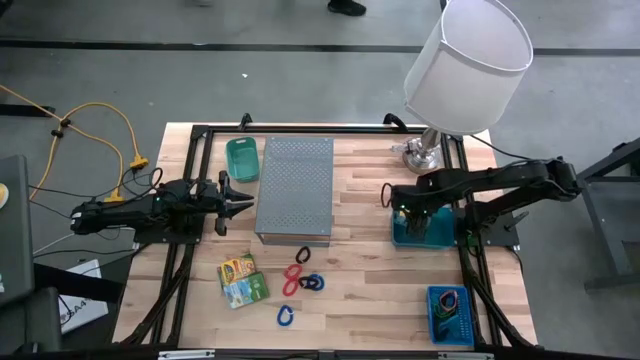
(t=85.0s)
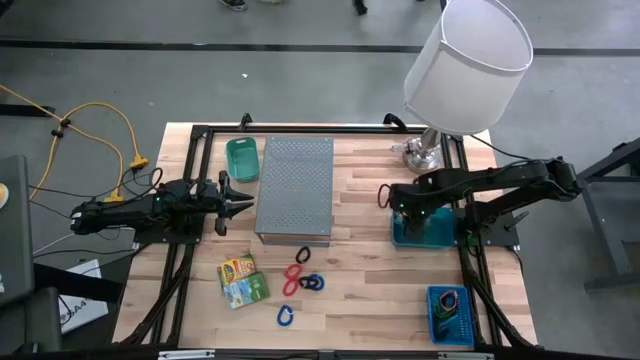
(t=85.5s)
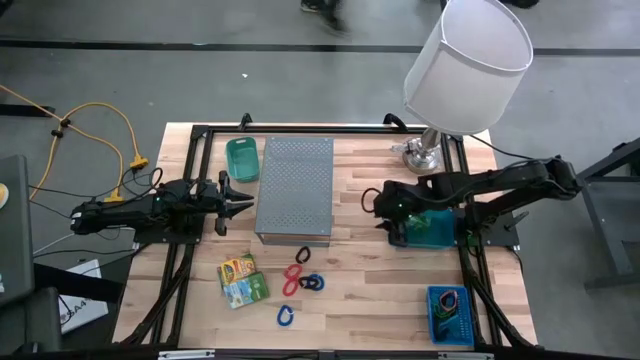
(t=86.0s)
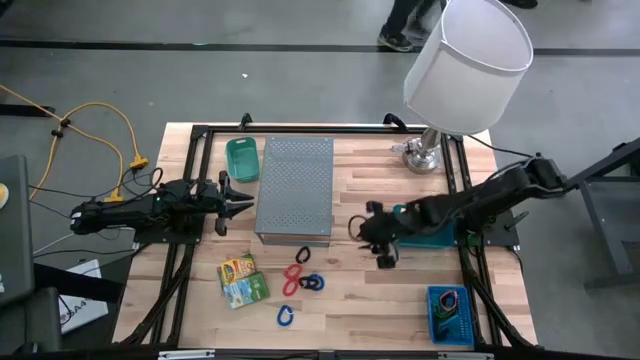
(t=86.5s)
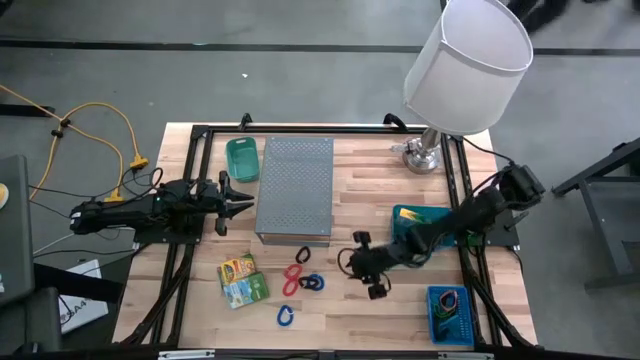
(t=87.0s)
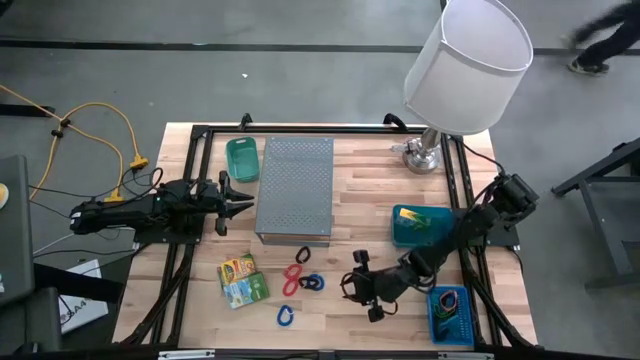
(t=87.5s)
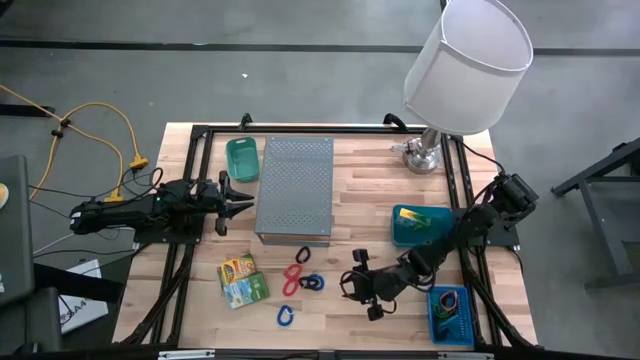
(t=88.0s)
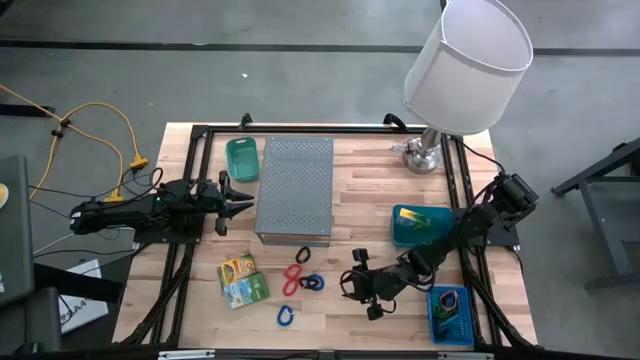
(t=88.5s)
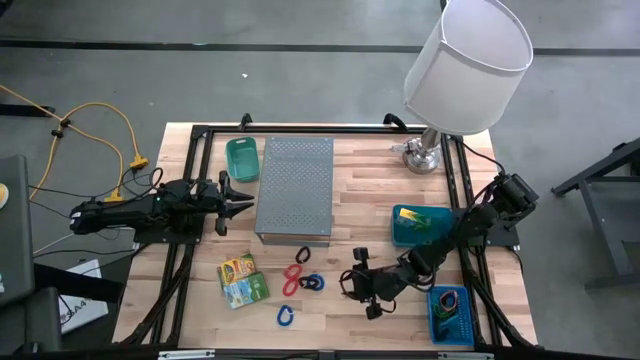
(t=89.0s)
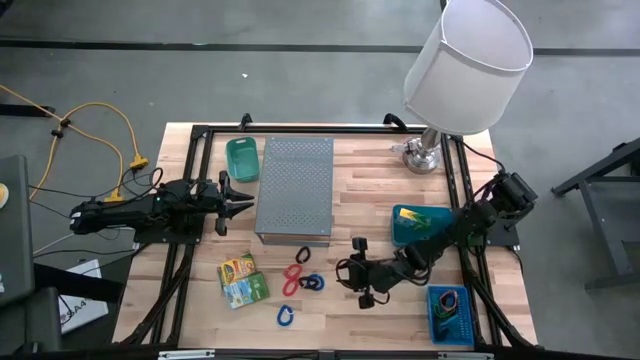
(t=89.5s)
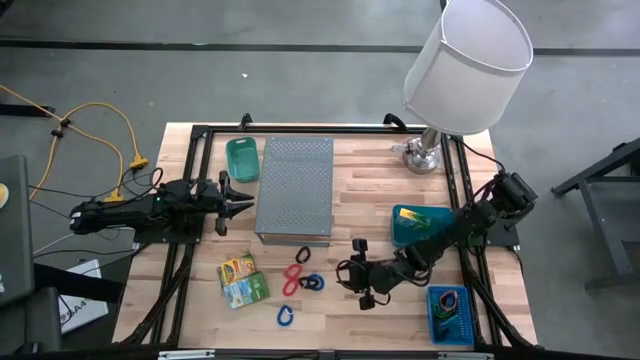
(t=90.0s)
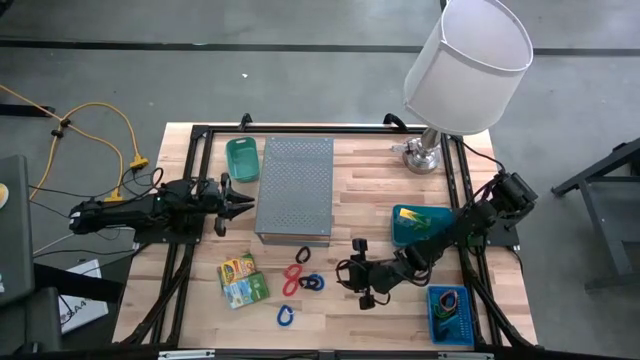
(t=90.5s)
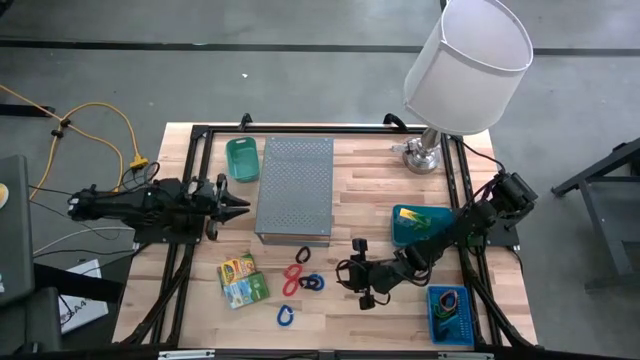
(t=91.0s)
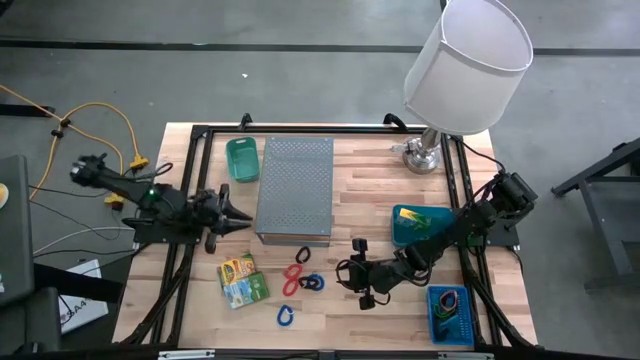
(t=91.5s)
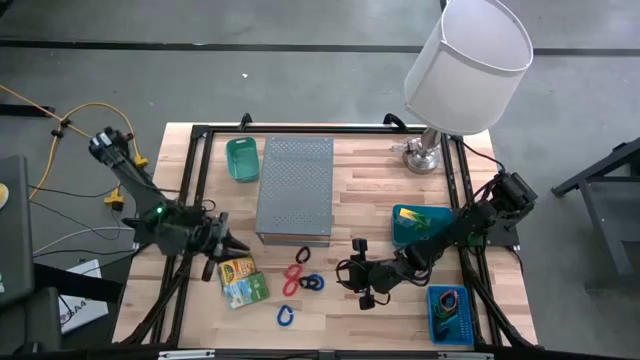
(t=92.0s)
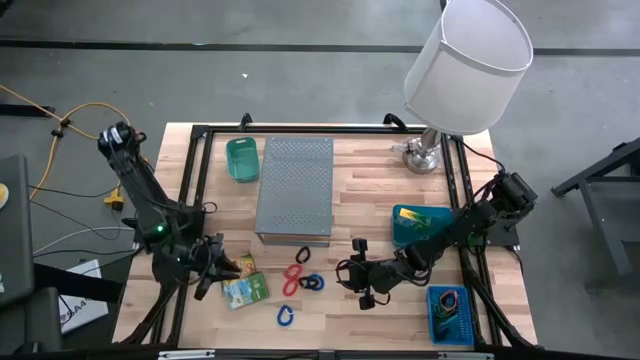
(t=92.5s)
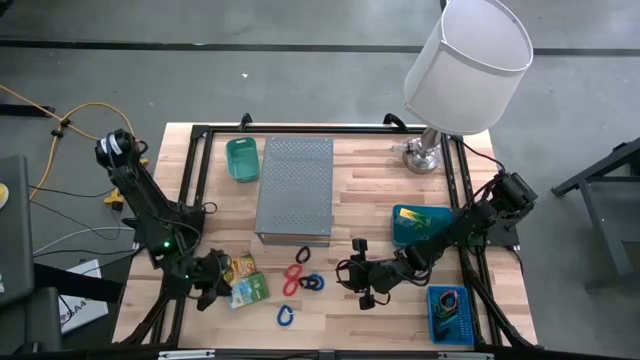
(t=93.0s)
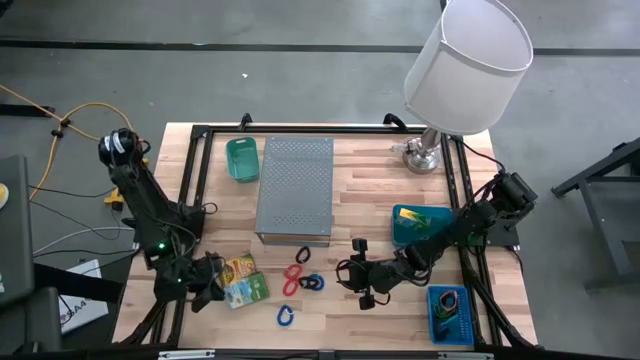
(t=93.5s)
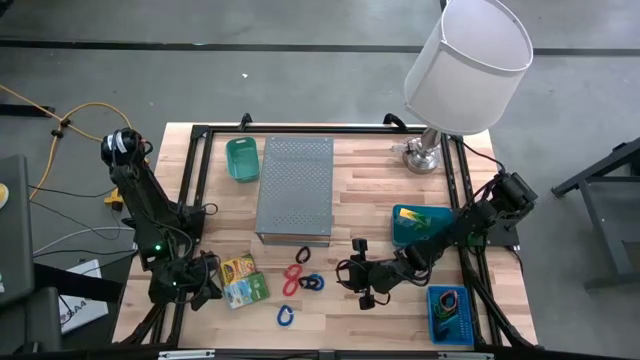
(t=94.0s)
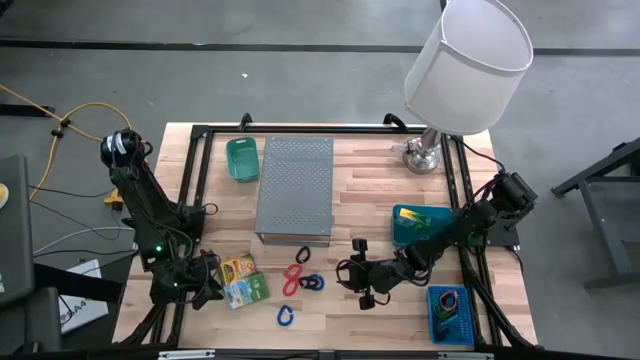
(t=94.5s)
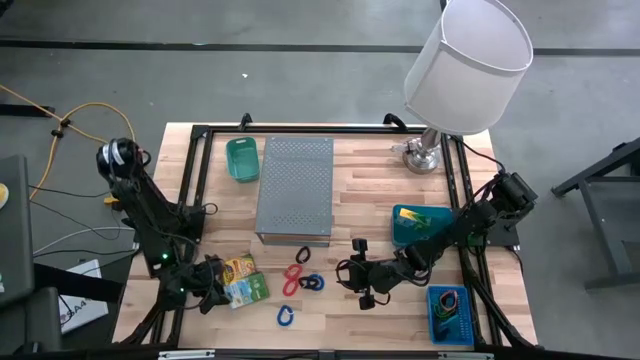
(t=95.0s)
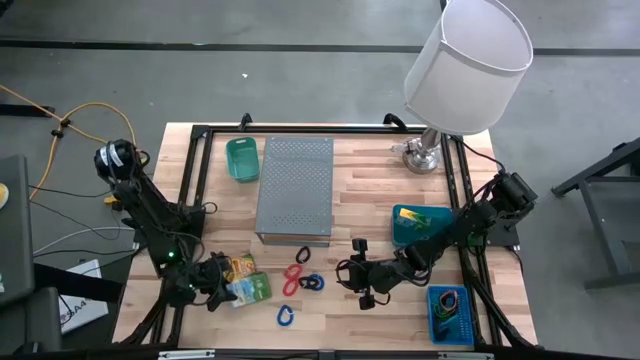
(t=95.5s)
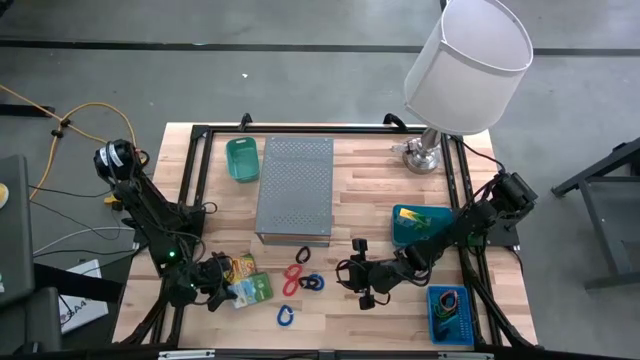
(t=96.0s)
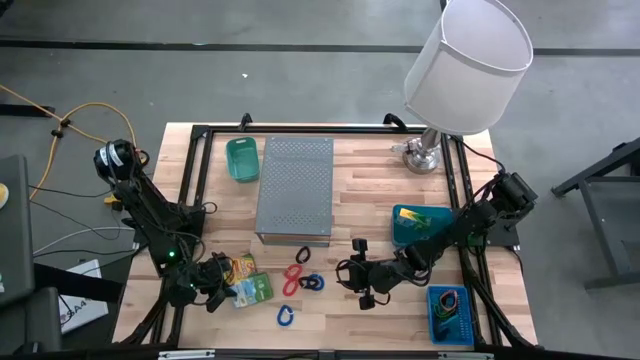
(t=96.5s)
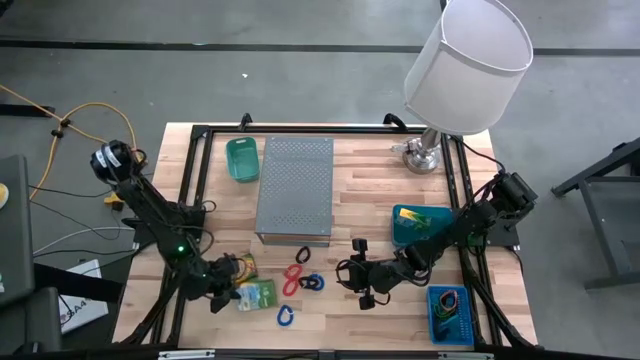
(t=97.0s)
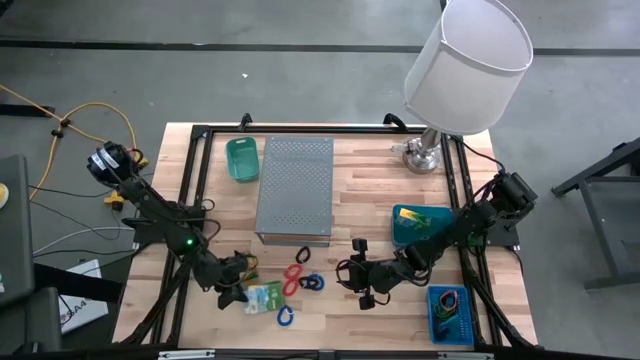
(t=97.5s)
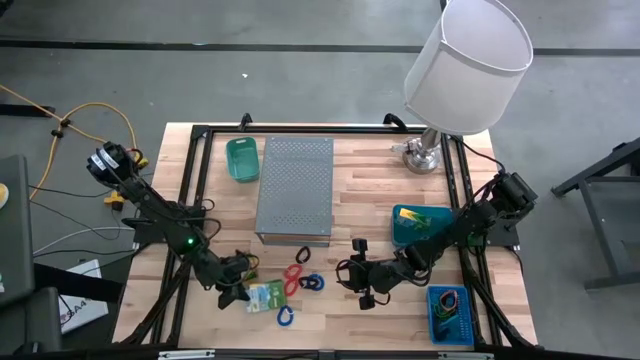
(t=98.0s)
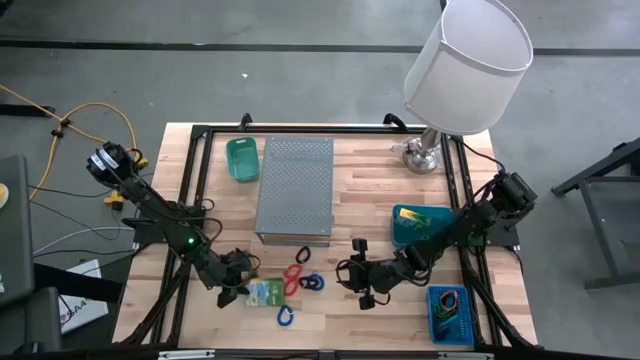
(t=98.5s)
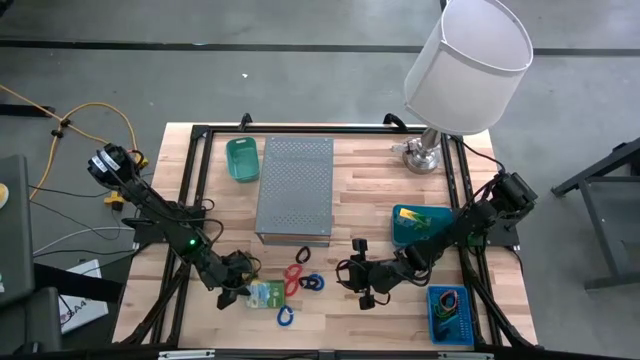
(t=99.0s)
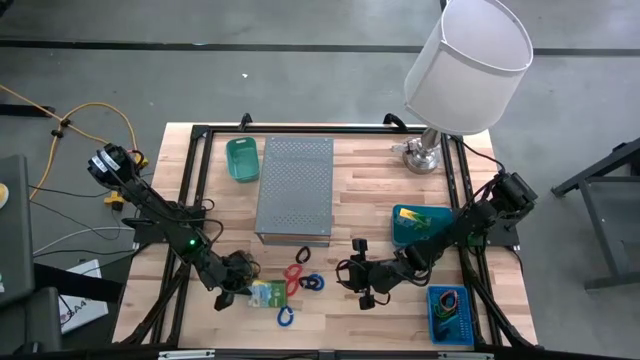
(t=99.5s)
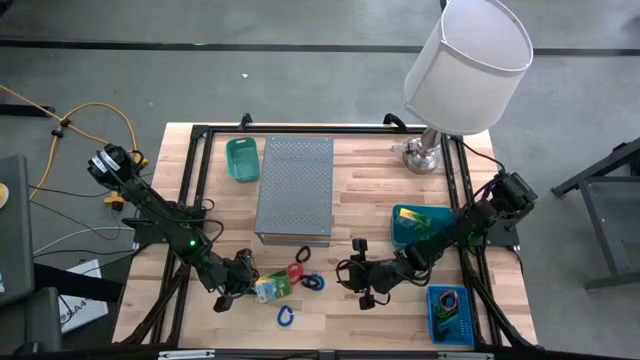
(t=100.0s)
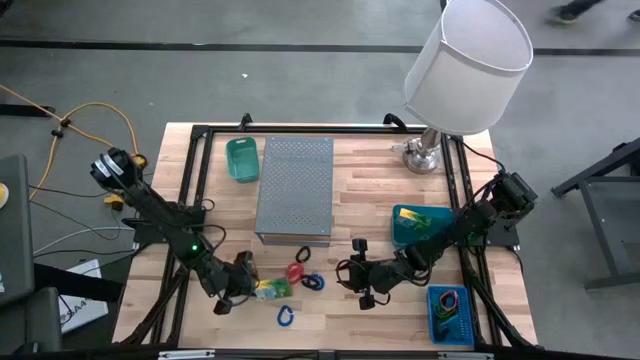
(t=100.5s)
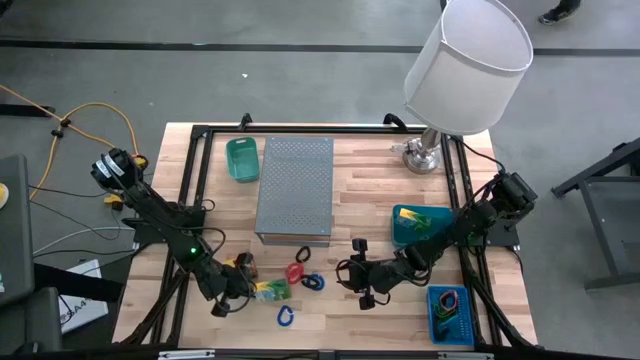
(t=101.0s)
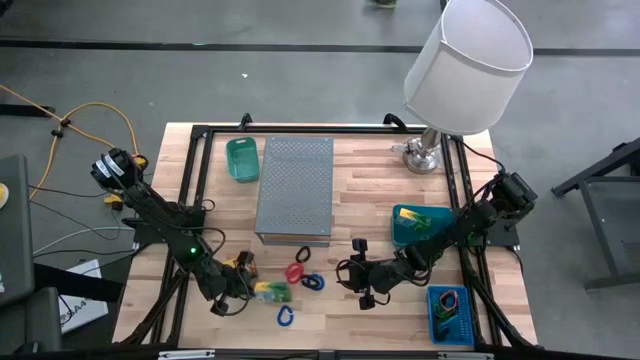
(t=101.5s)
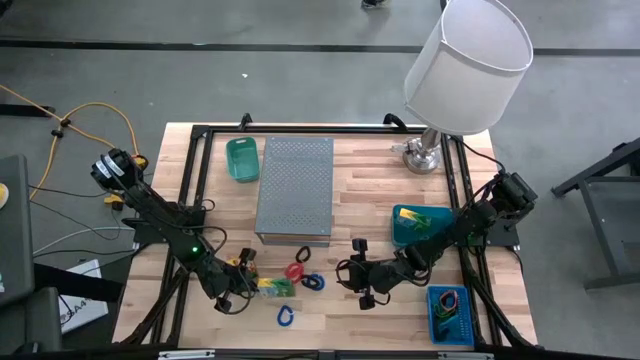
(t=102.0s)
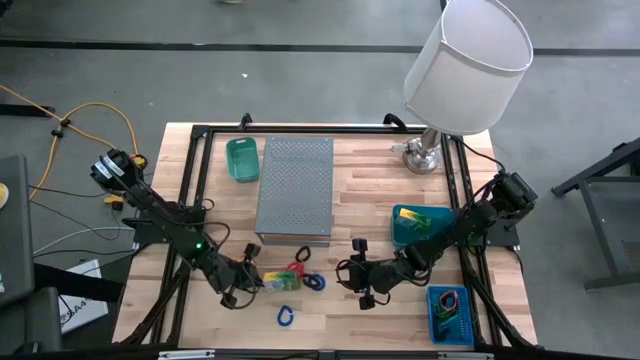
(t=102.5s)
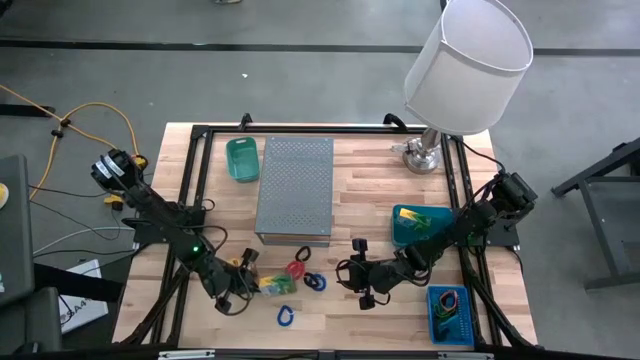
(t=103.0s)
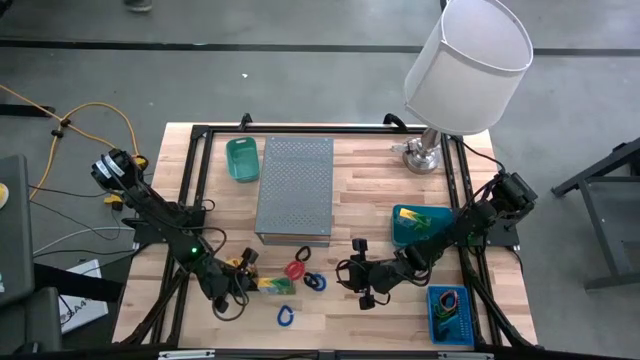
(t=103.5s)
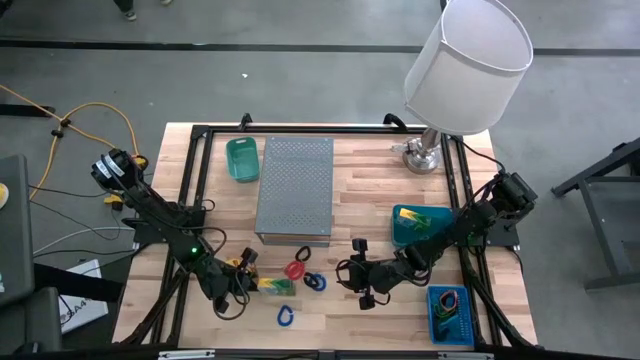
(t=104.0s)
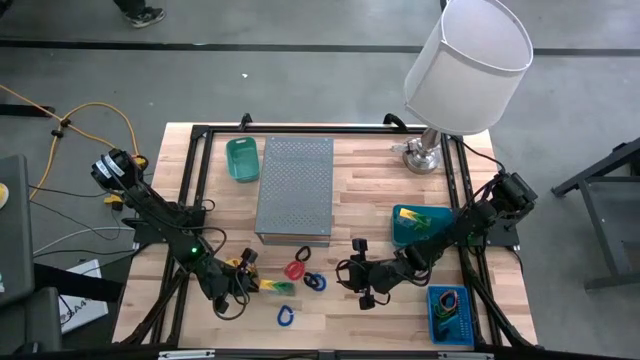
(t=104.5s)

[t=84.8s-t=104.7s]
Task: Pick & Place Office Desk Supplies
Put the bottom crayon box into the blue bin

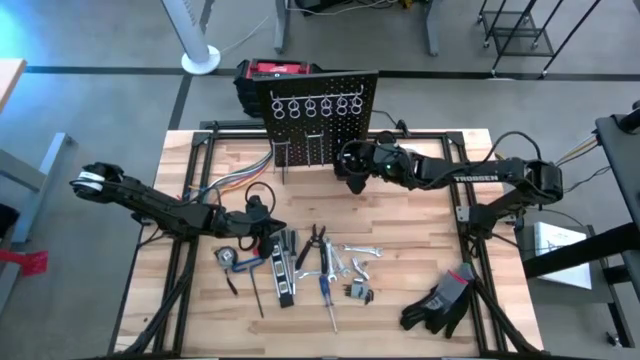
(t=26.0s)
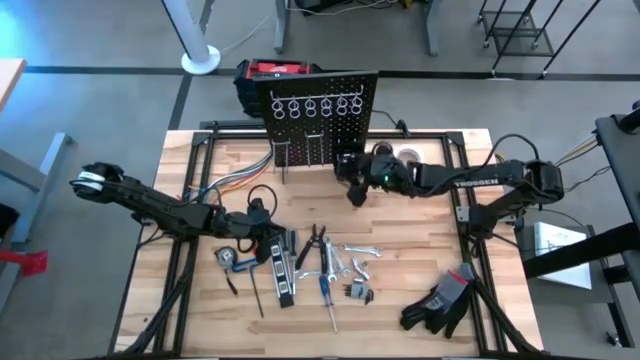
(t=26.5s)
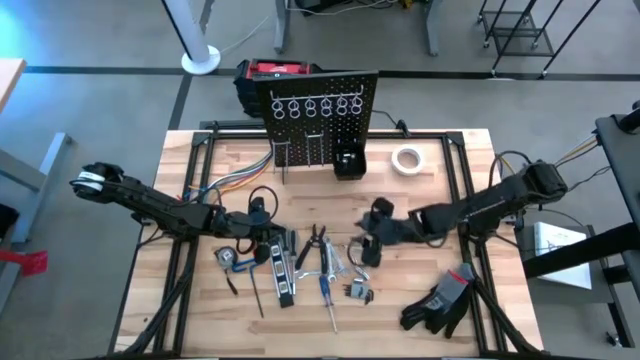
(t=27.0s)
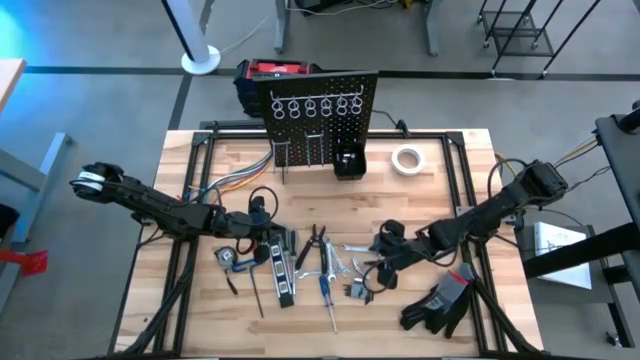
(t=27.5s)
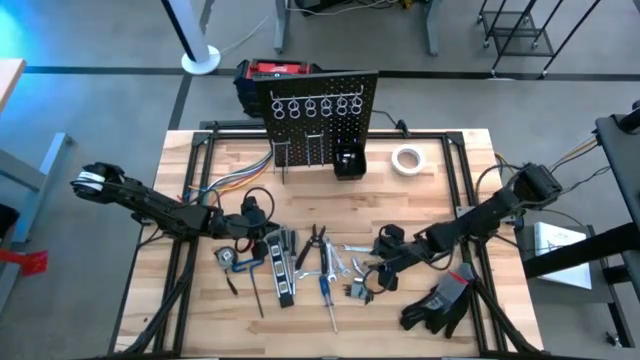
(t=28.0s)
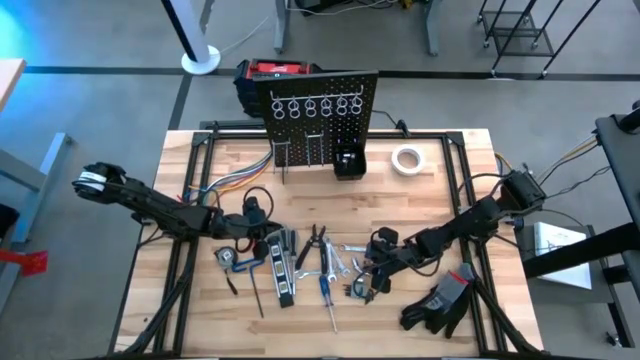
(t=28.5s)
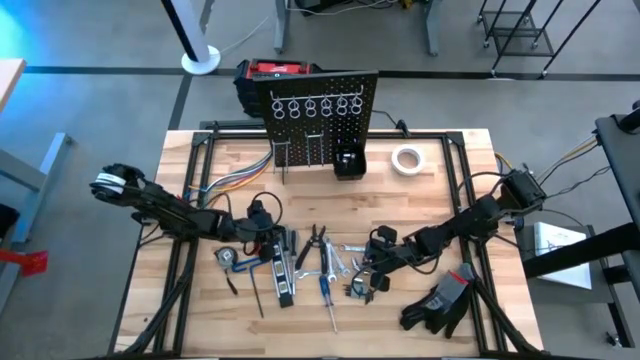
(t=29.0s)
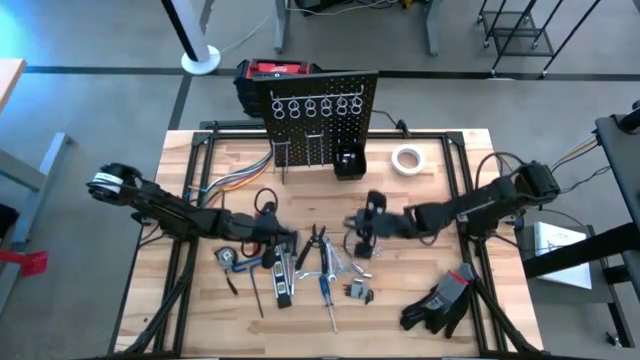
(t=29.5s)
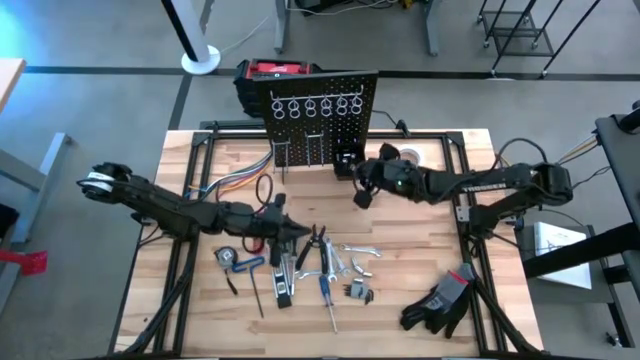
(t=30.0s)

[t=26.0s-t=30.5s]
Task: Hang tools onto peg board
Put the socket into the black tool bin on the peg board
